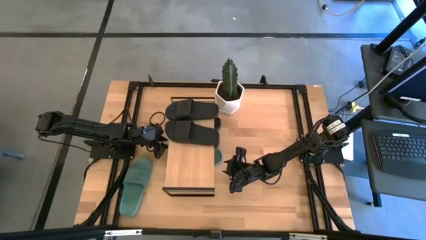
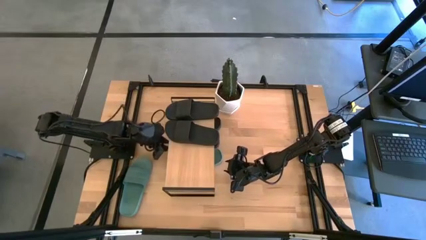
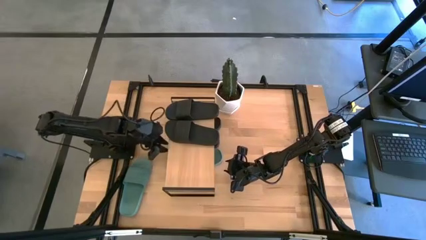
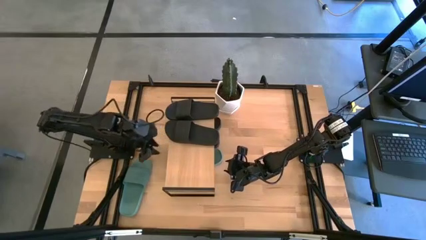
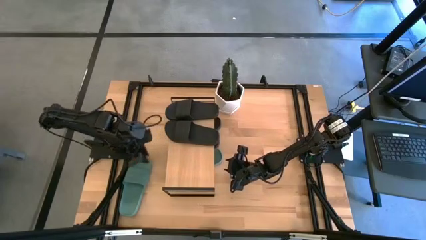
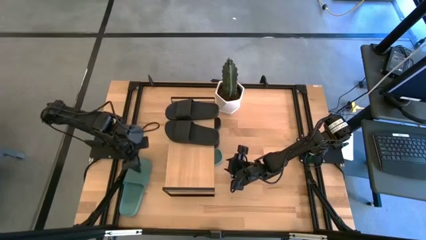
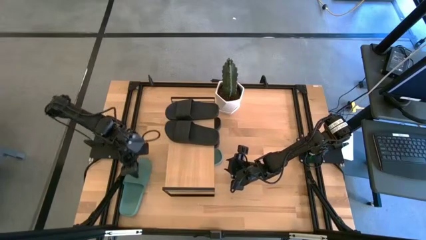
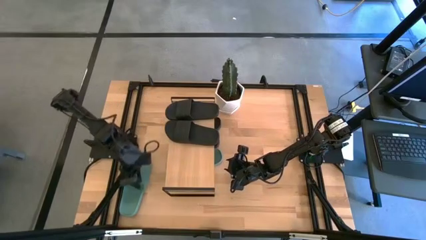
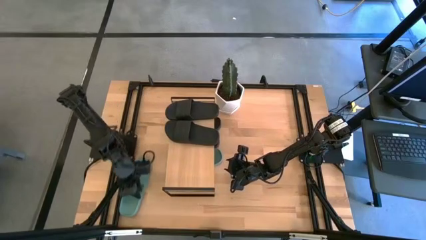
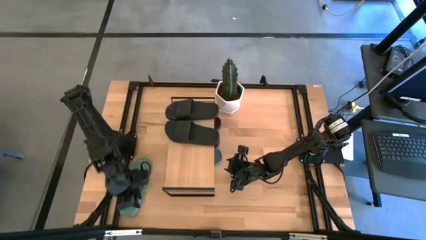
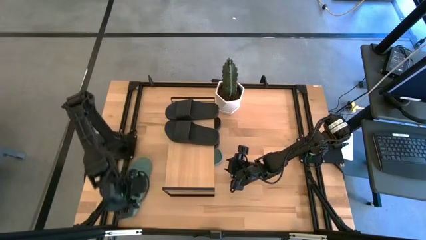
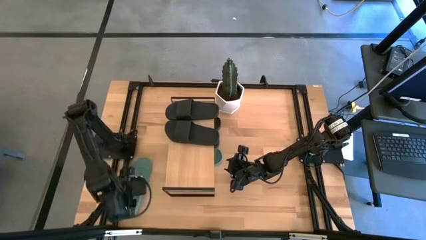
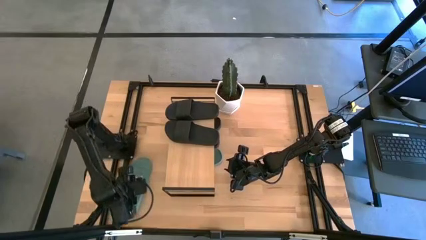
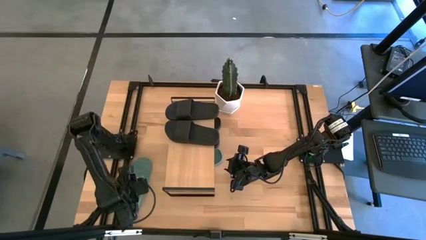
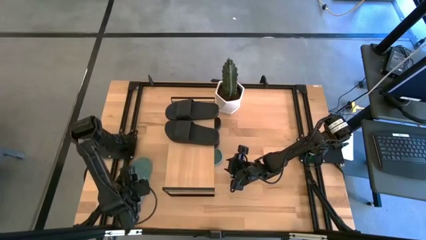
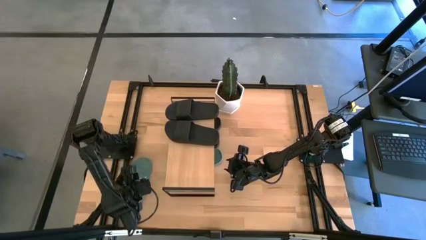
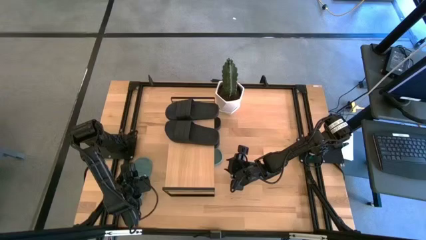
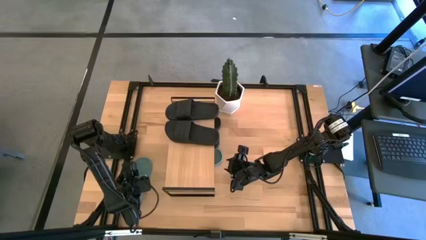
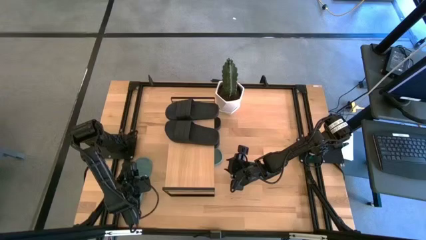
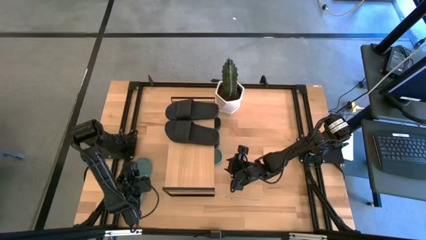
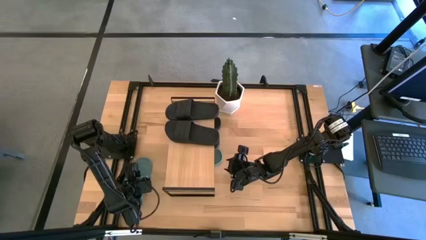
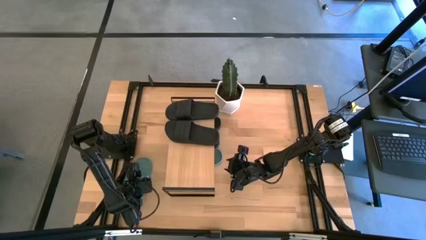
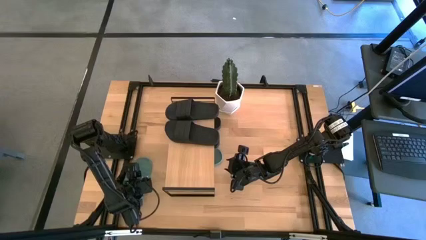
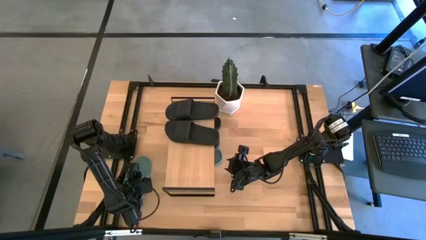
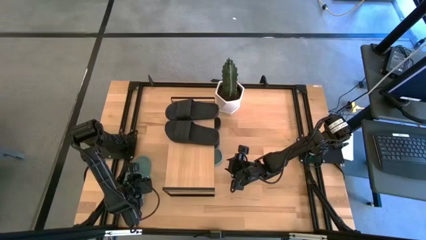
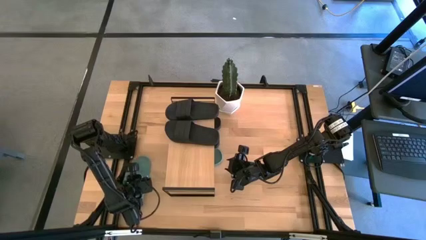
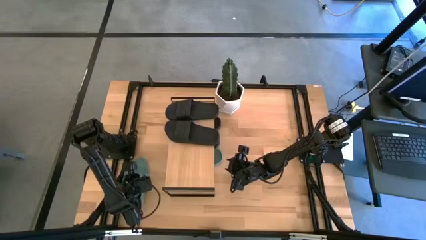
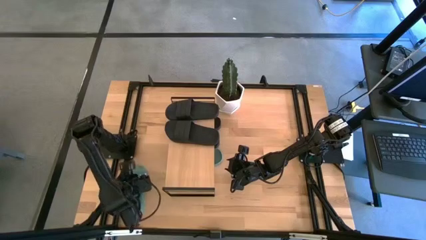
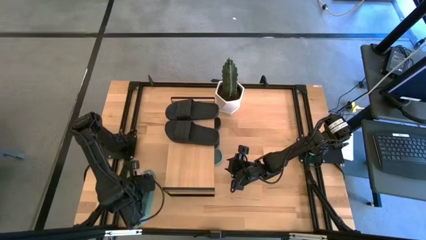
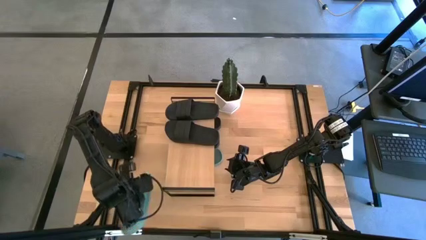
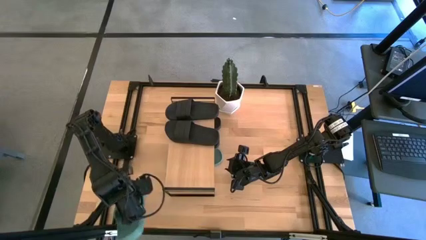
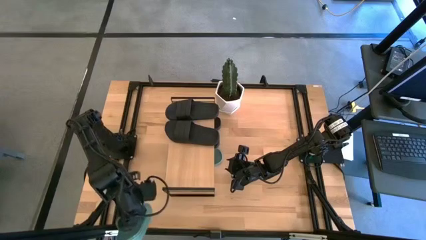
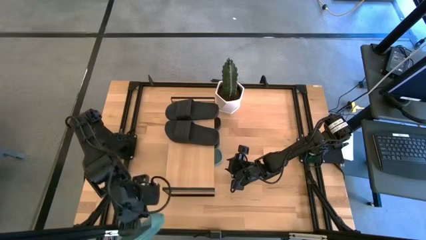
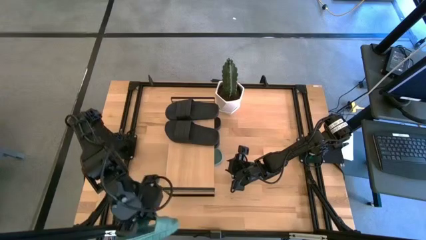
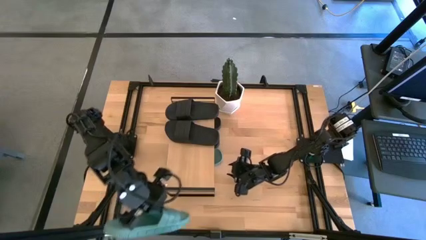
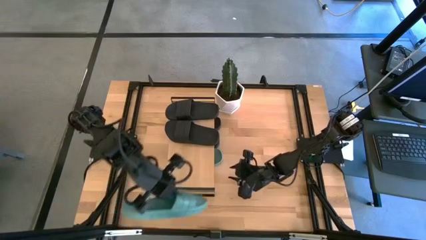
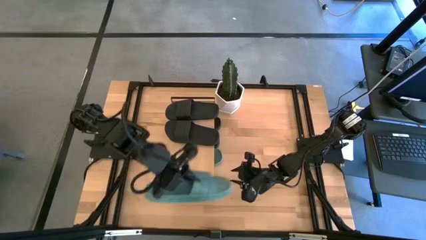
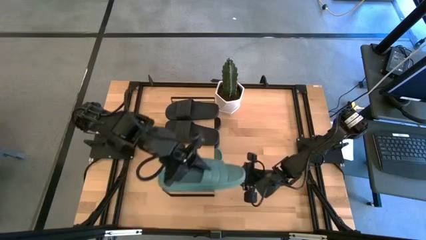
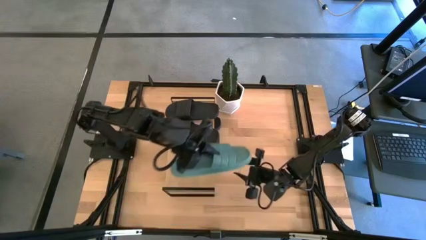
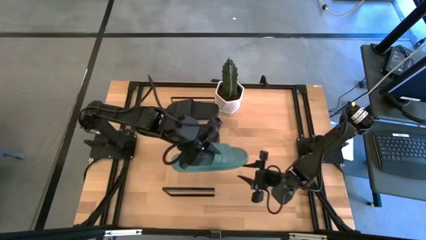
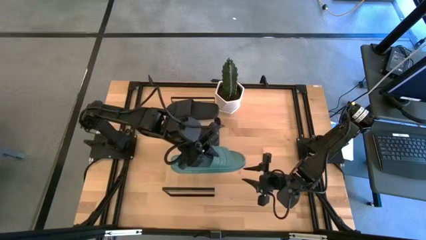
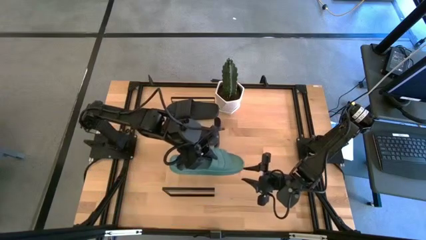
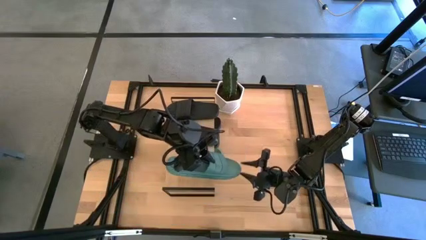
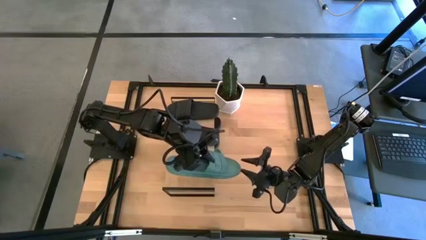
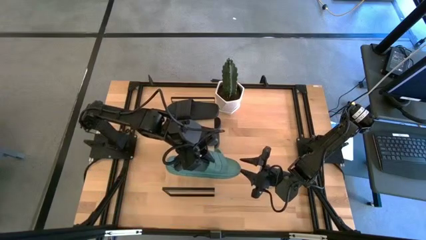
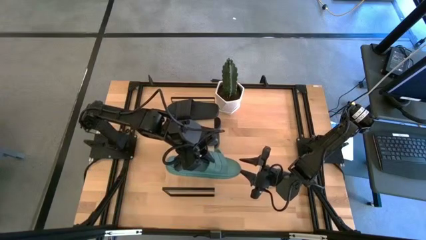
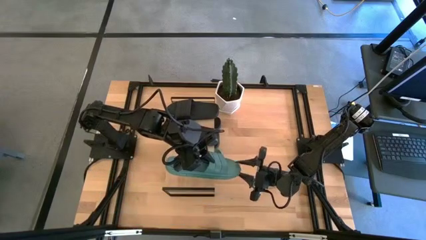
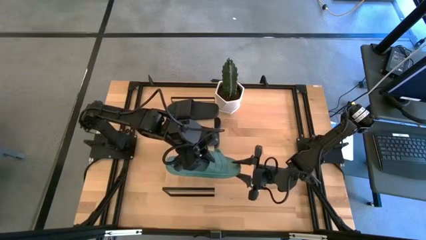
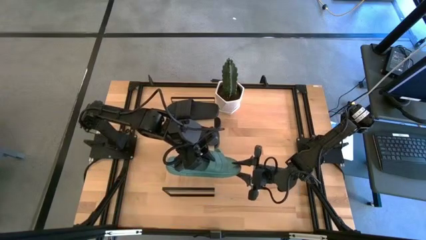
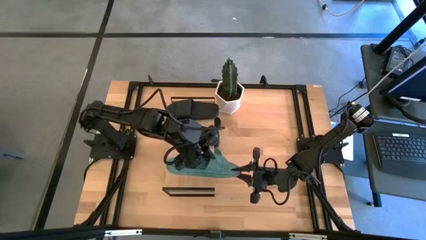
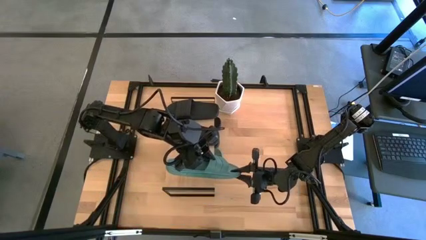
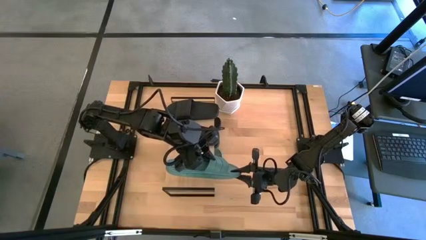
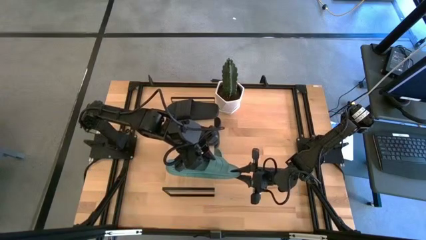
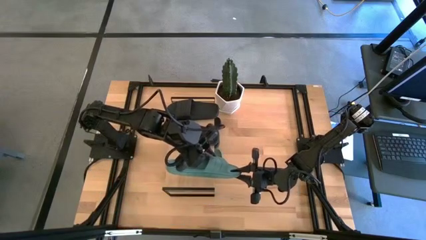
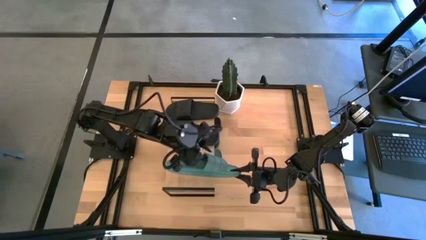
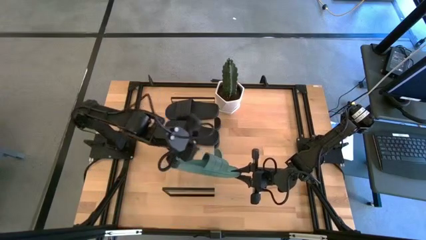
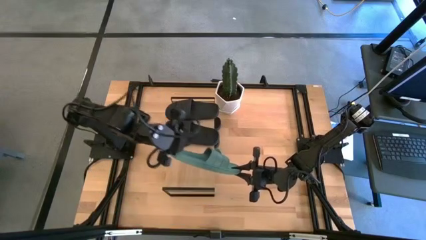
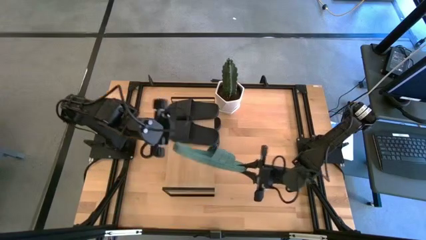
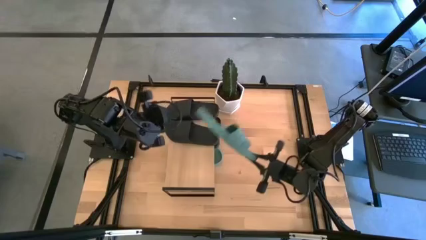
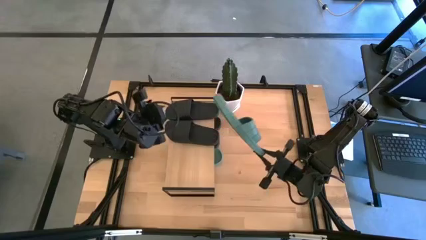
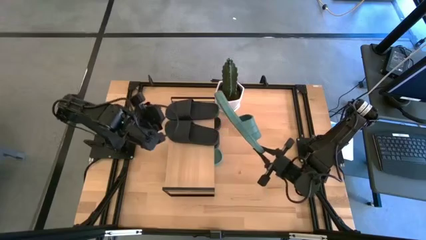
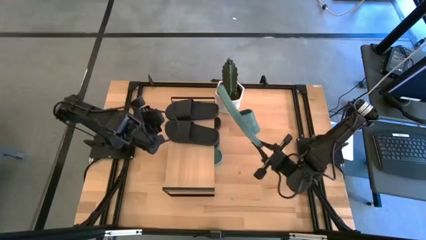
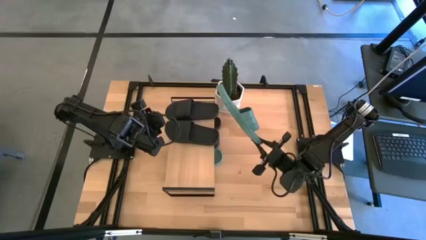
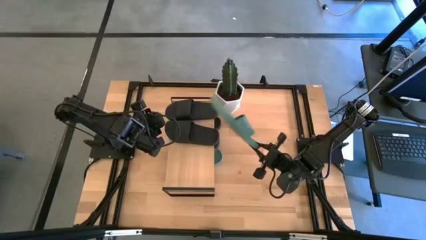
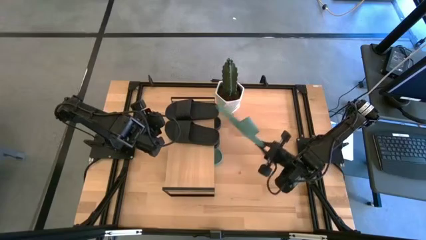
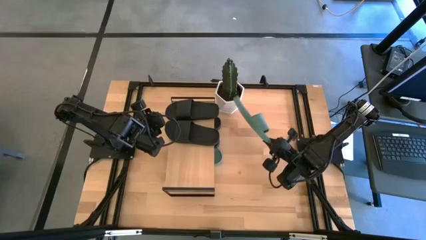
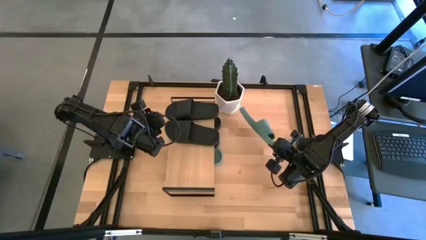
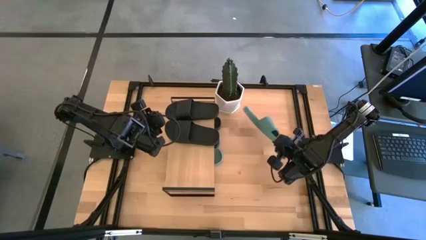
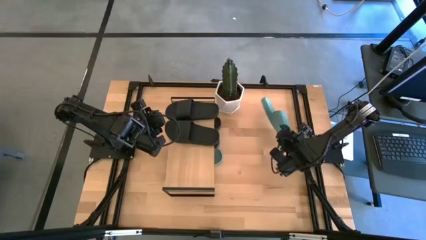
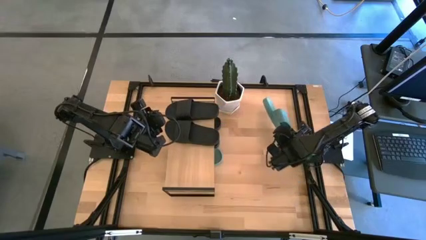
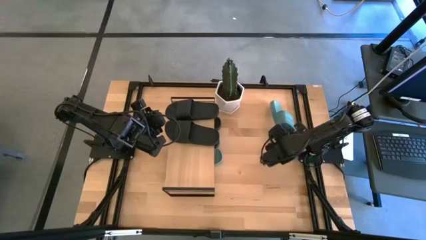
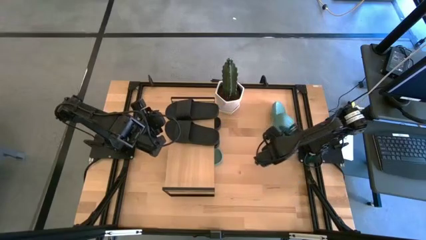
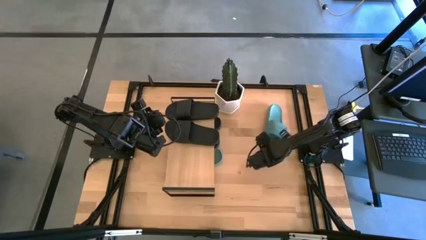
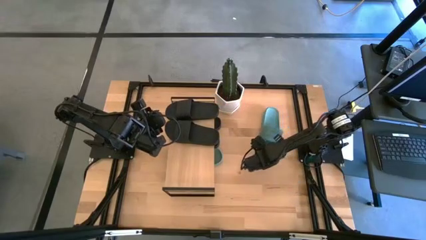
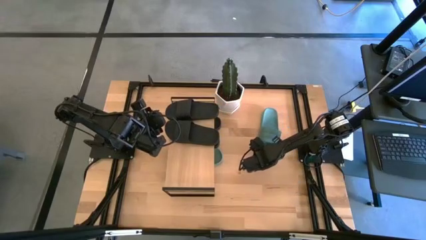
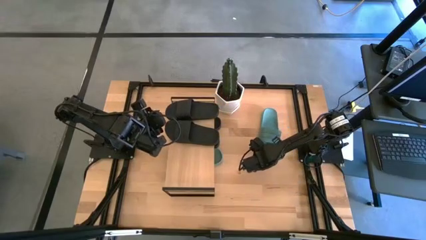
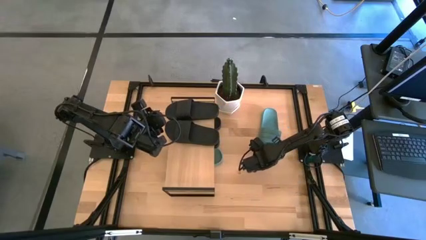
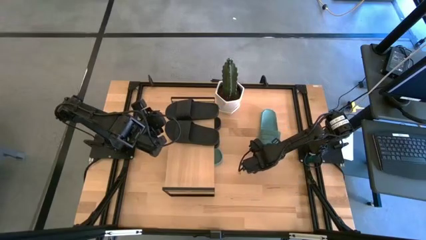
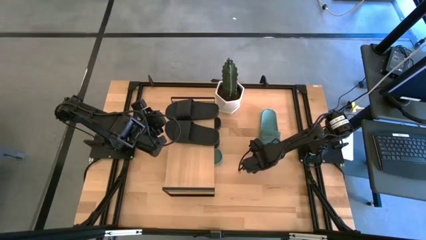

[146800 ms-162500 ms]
Task: Pick and place slides into the shelf
Put the green slides under the shelf
